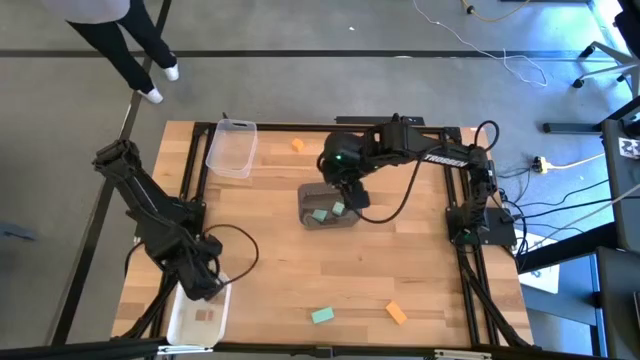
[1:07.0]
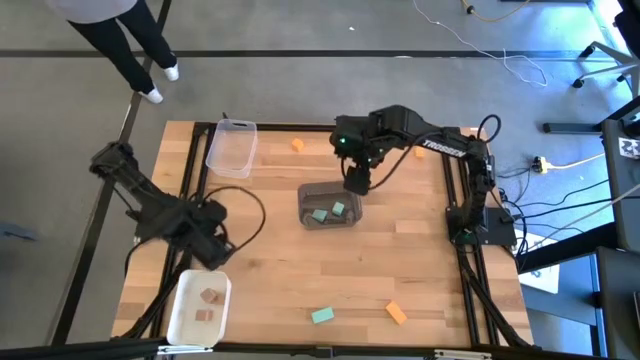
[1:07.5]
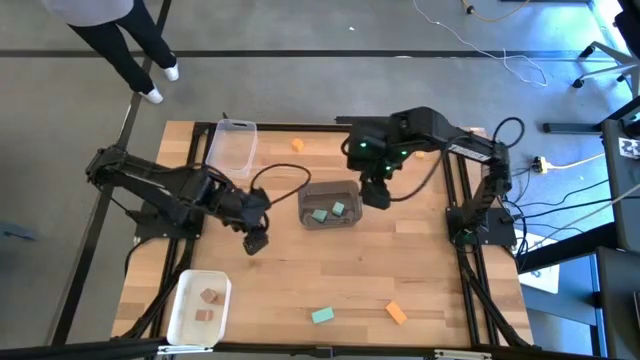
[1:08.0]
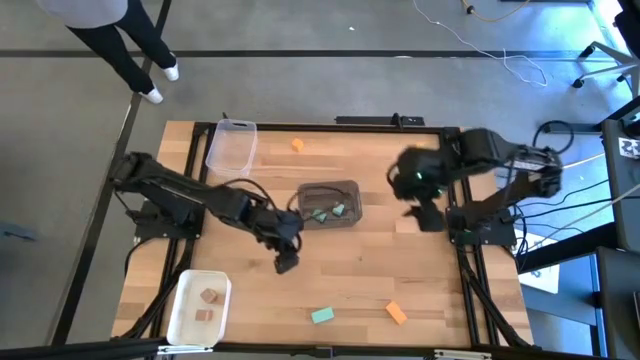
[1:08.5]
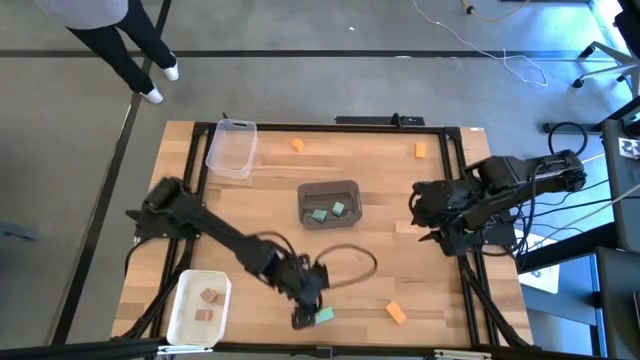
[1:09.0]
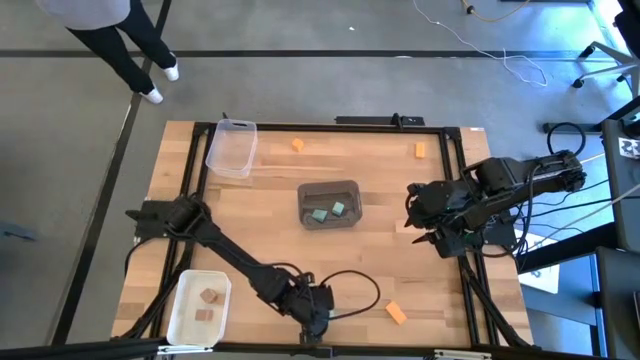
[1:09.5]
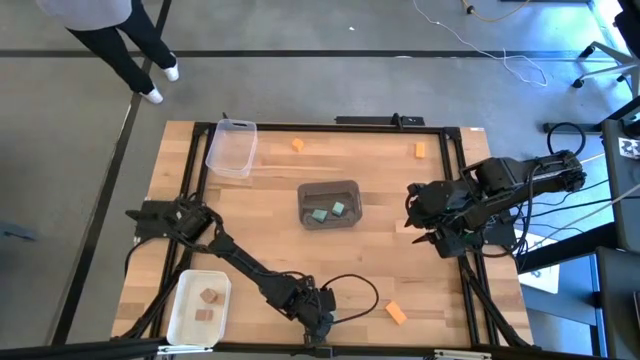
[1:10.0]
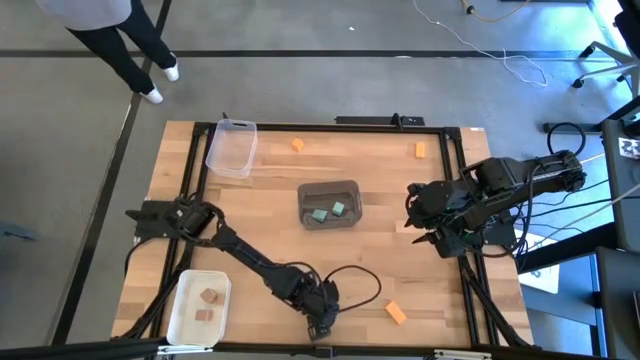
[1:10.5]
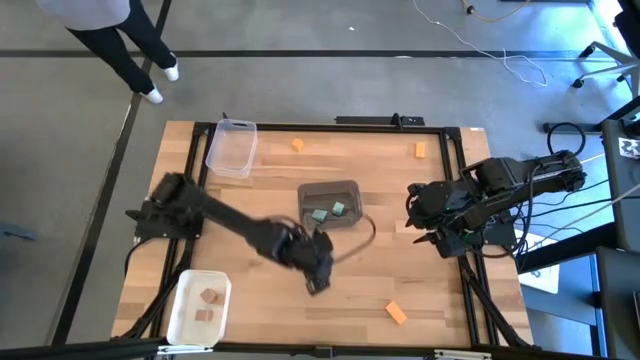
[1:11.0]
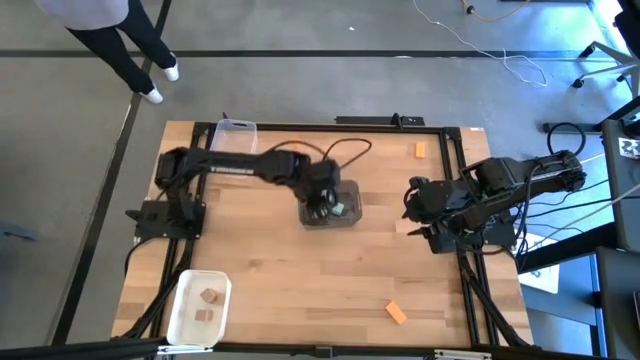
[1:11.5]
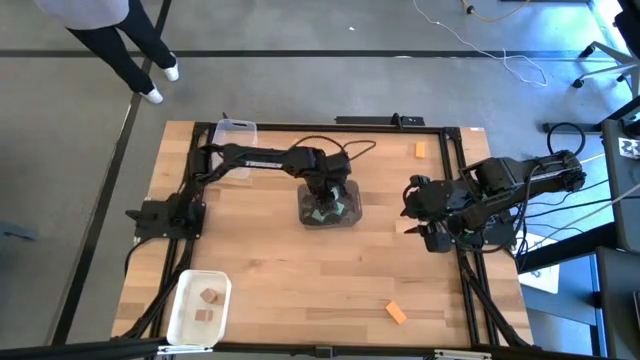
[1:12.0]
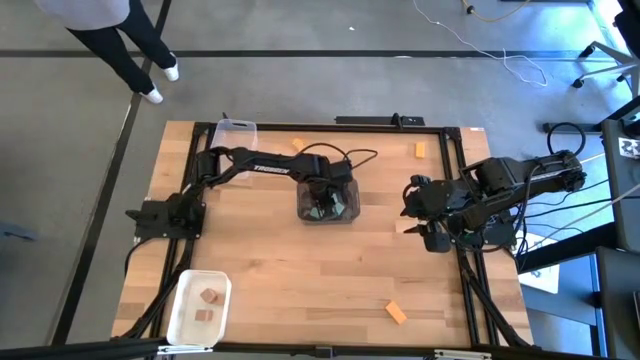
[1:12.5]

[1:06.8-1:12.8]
Task: Sort & place blocks by color
Put the light blue block into the black transparent bin

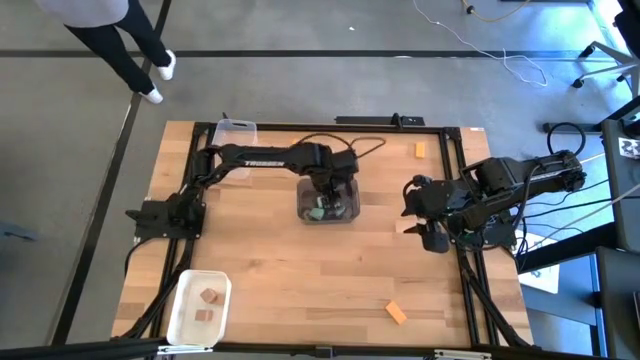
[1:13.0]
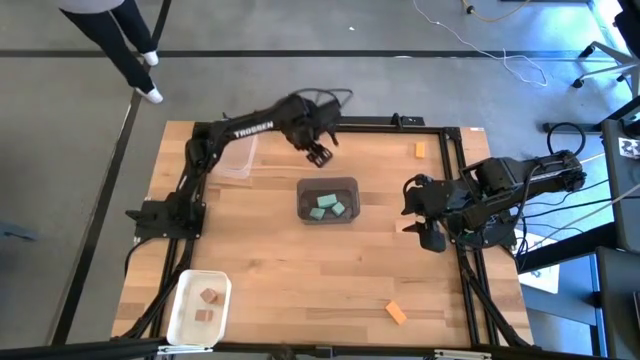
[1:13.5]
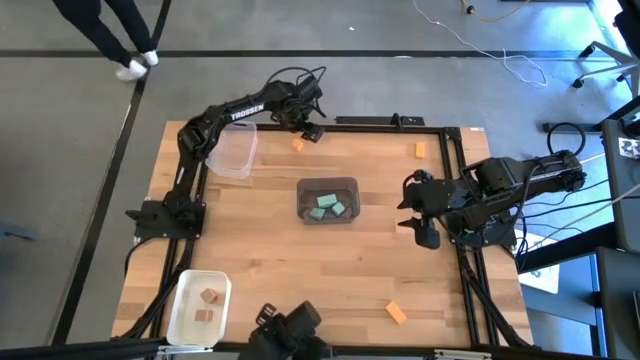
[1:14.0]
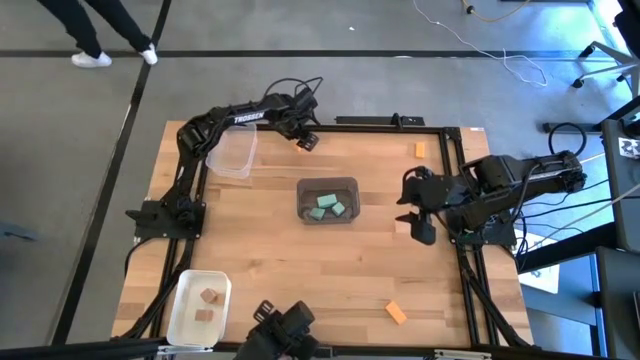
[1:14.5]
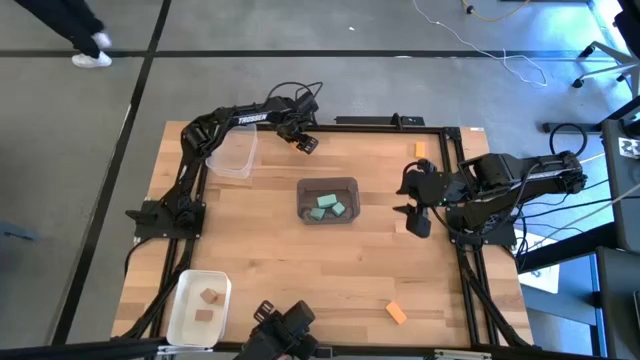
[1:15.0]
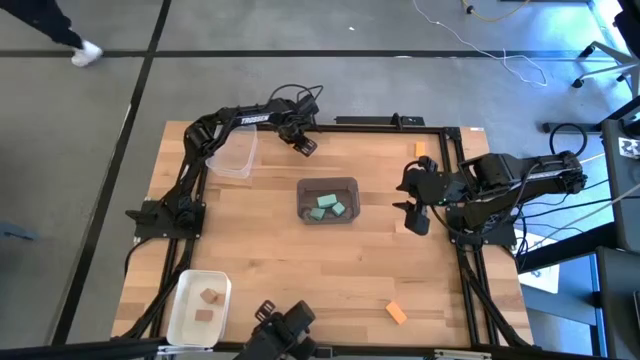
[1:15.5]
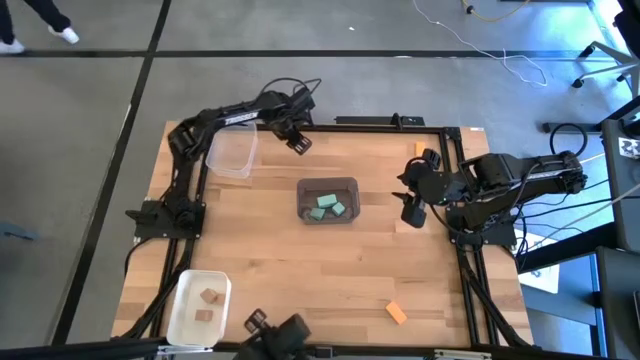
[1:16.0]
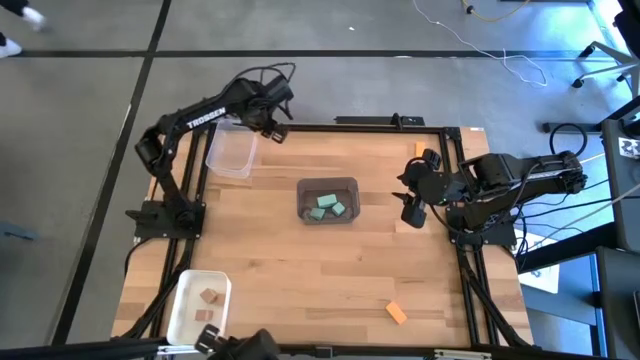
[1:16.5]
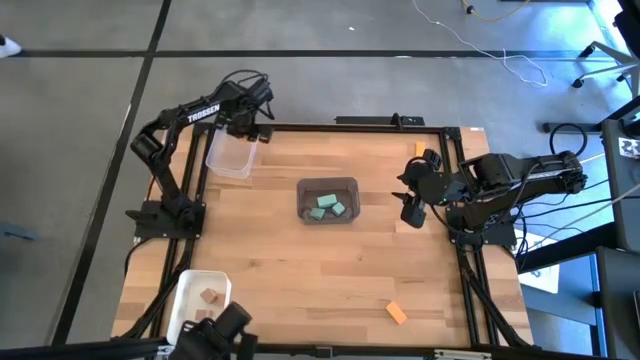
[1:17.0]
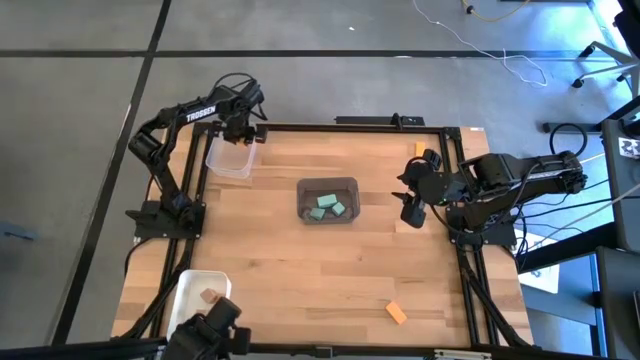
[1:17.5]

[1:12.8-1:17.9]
Put the top left yellow block into the transparent bin

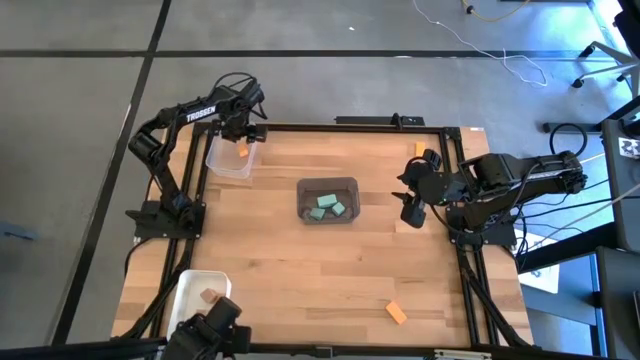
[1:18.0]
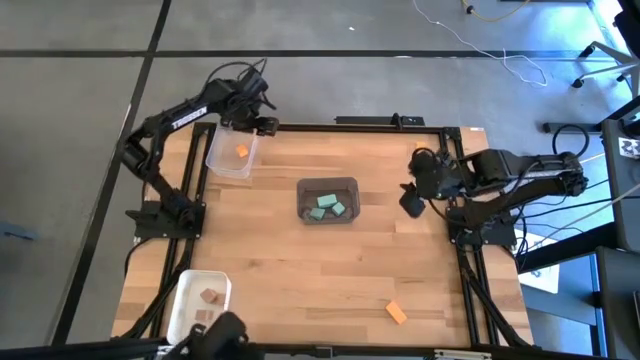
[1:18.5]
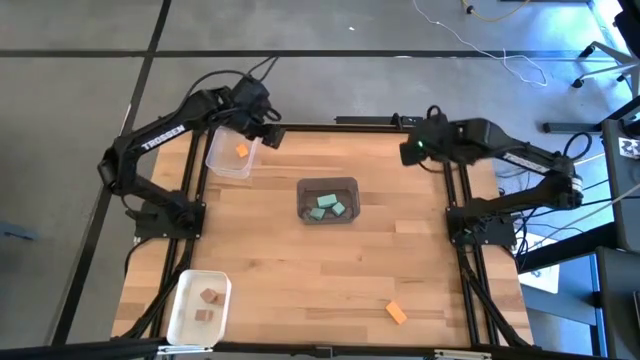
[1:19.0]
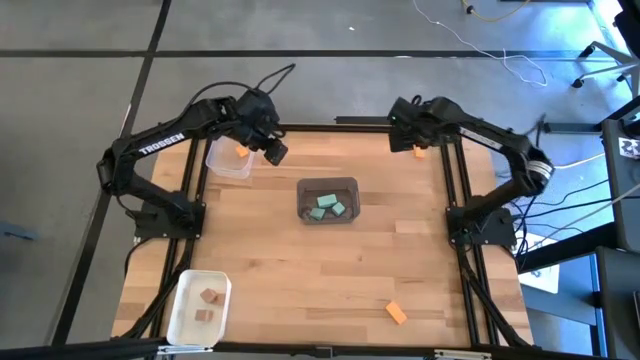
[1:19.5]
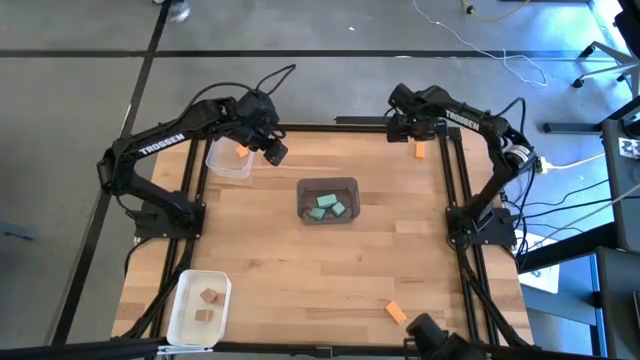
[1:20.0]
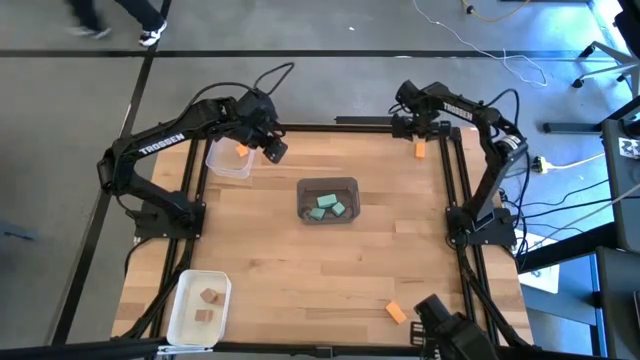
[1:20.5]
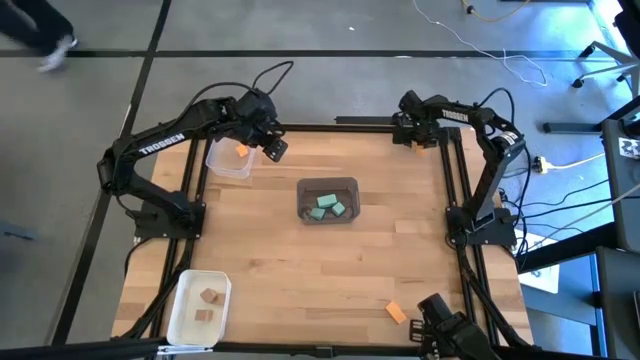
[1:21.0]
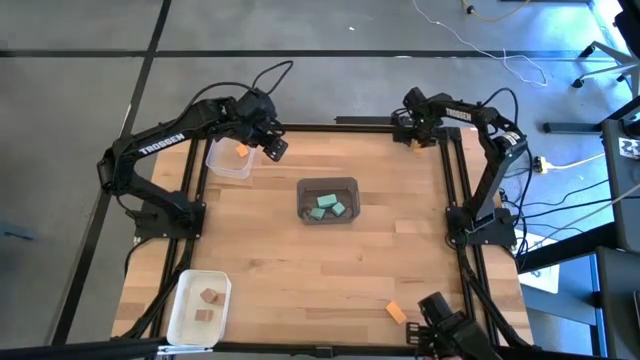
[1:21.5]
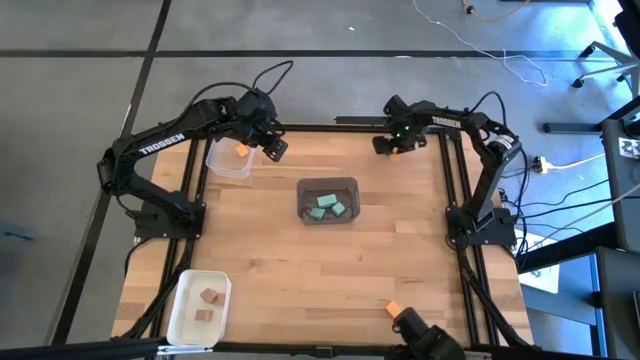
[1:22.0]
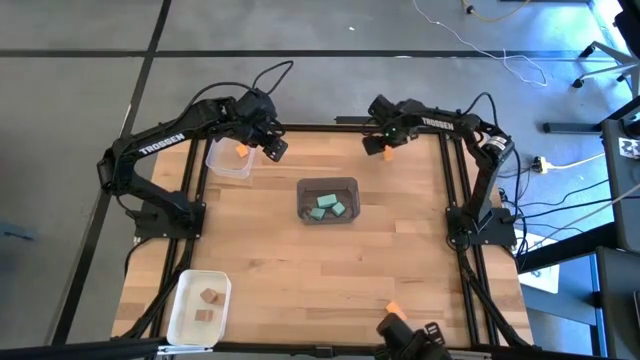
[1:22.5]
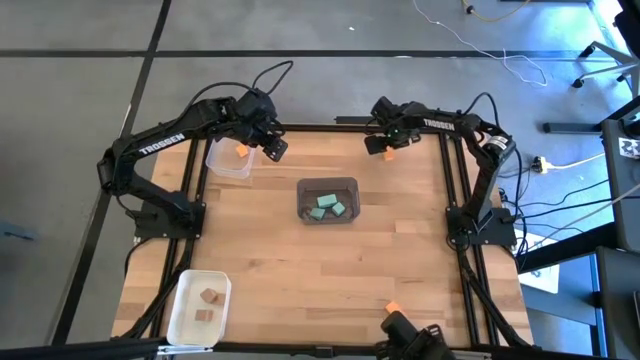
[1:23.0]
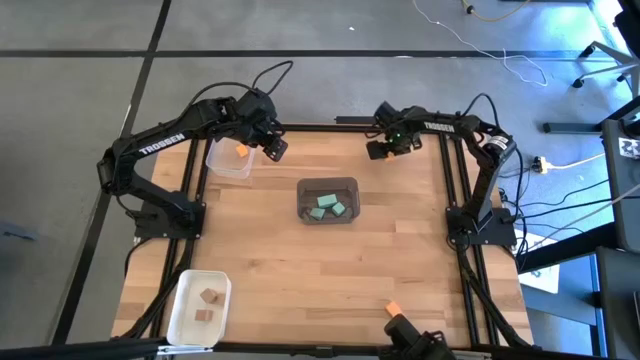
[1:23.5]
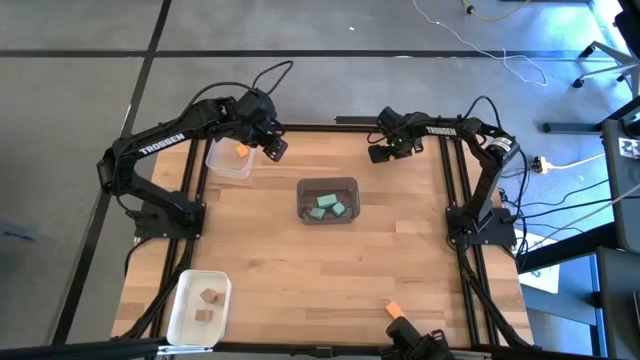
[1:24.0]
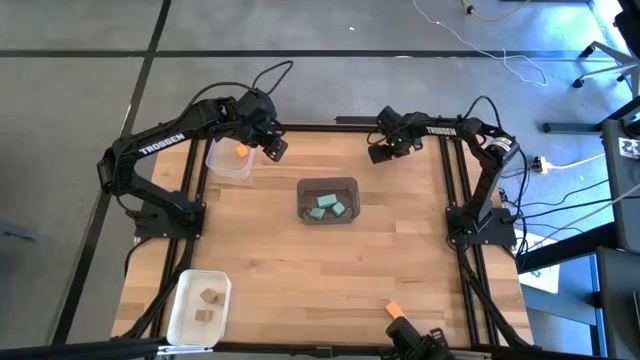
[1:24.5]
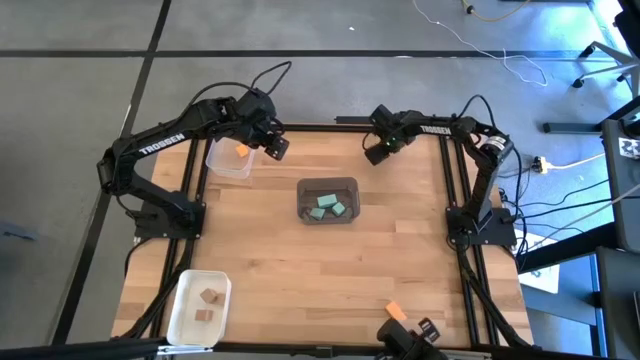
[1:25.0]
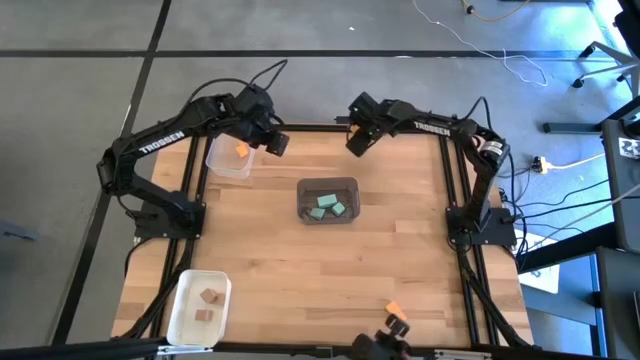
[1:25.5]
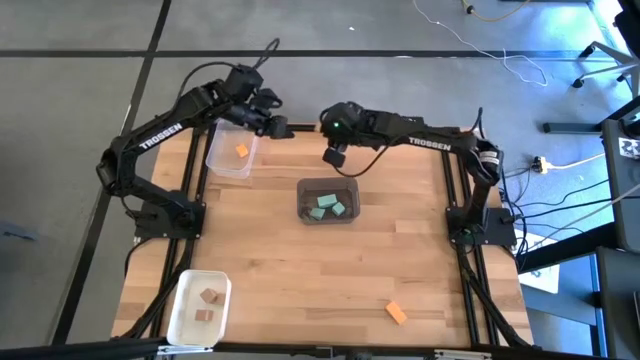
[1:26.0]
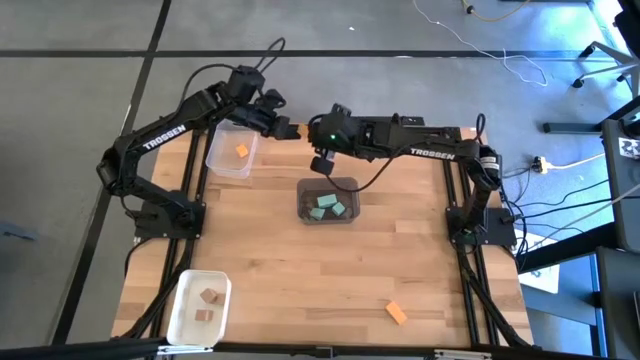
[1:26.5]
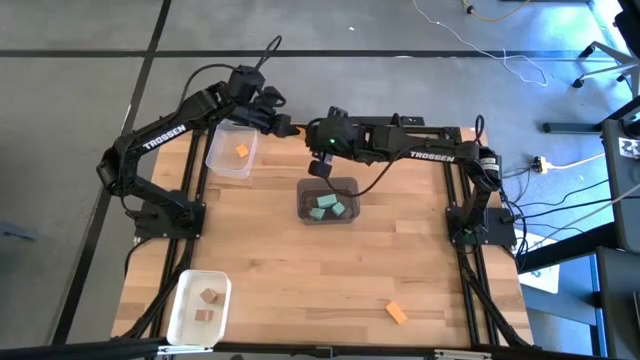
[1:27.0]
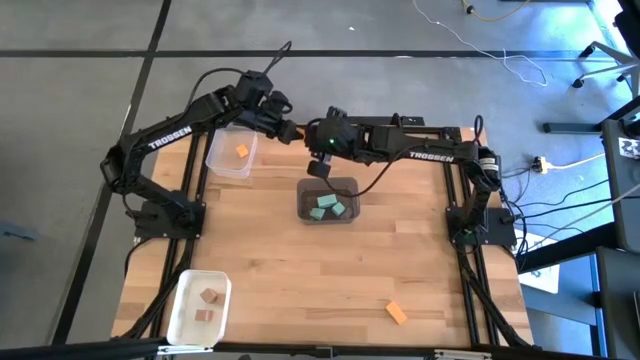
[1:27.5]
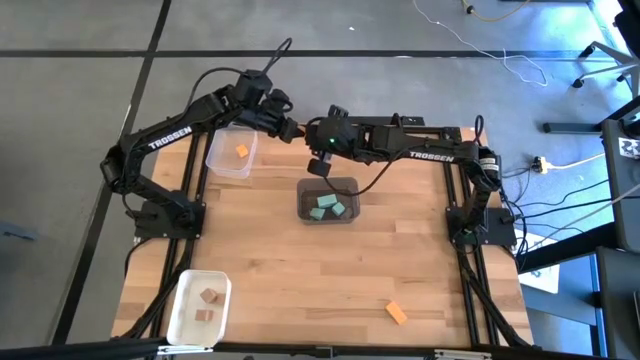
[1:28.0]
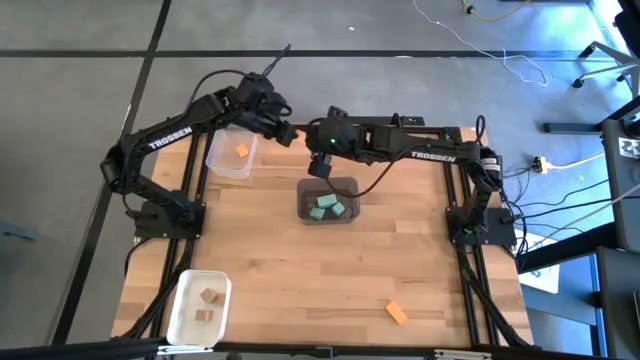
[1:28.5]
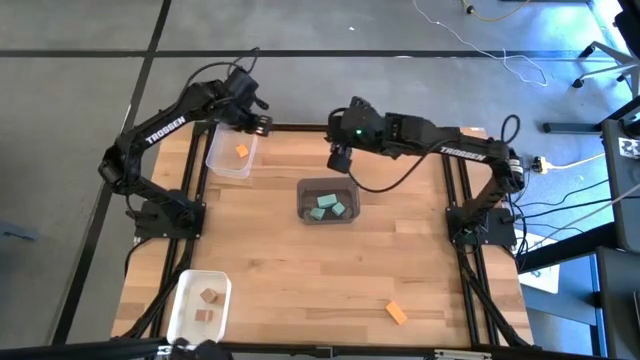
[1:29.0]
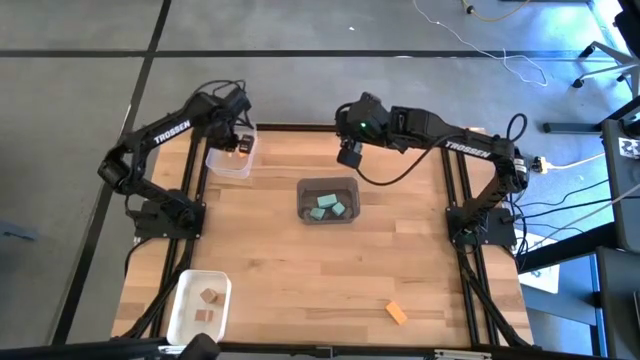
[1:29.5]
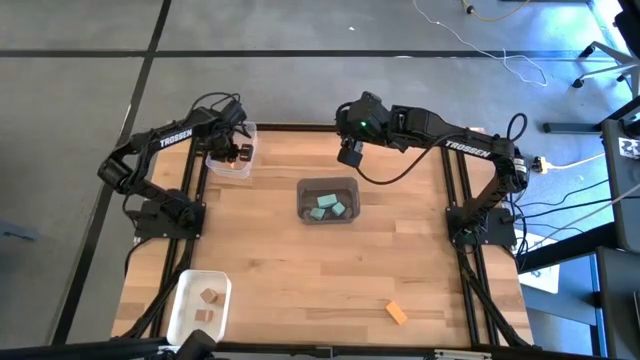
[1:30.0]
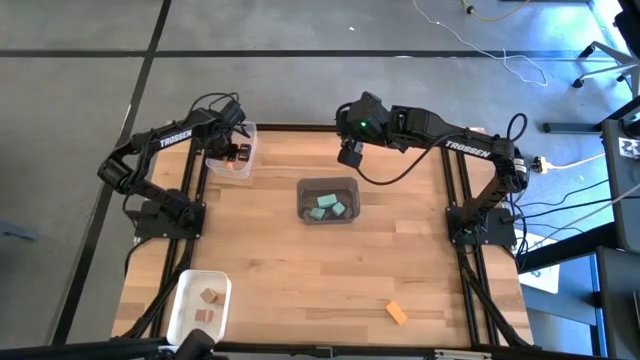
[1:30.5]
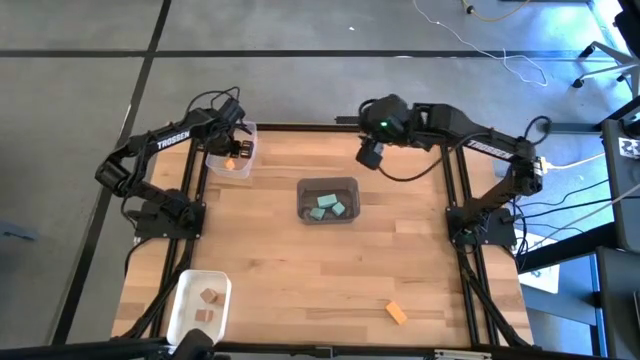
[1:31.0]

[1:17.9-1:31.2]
Put the top yellow block into the transparent bin
